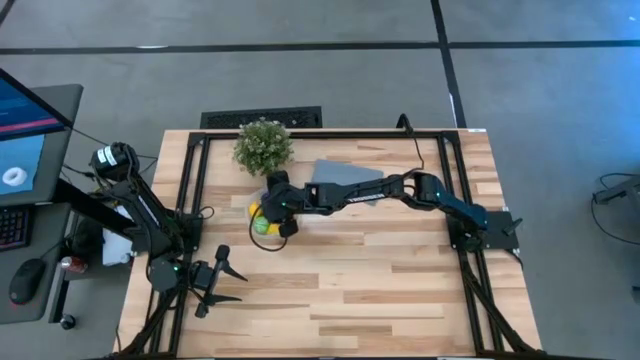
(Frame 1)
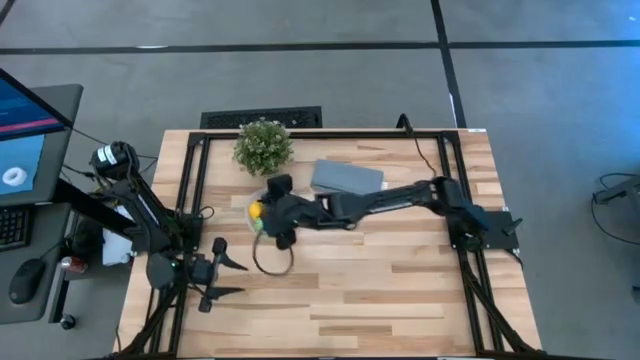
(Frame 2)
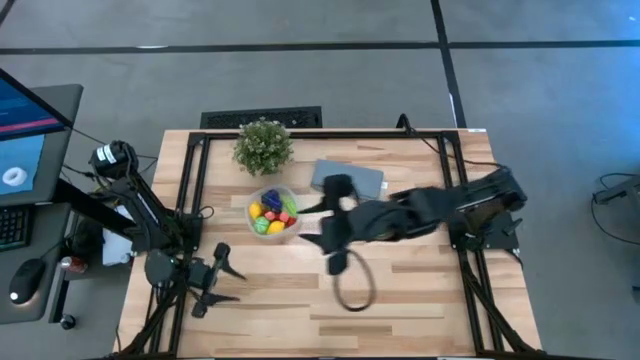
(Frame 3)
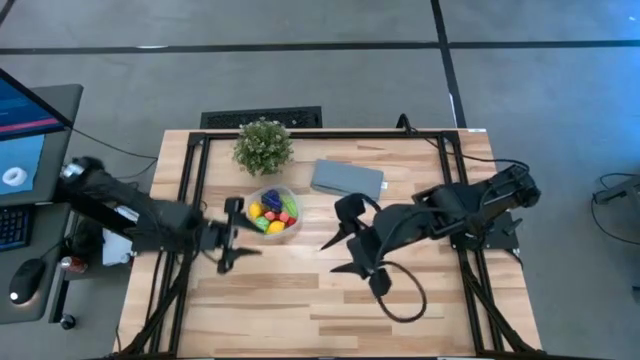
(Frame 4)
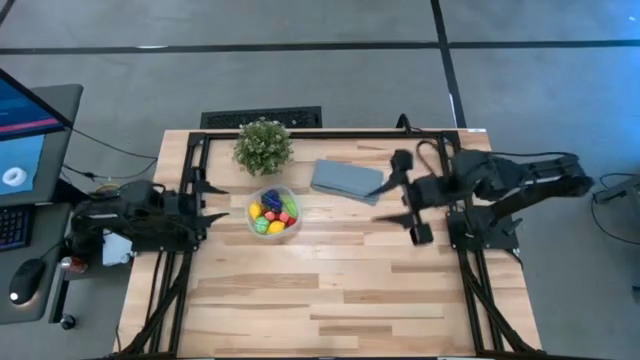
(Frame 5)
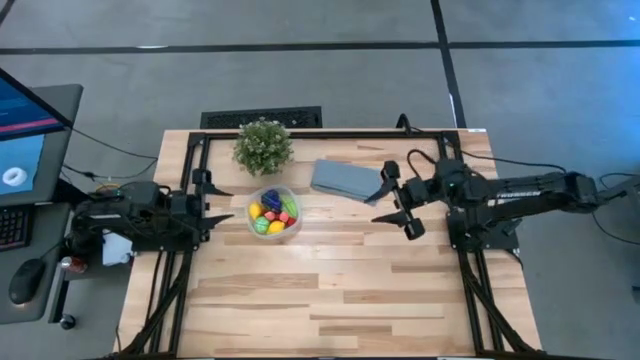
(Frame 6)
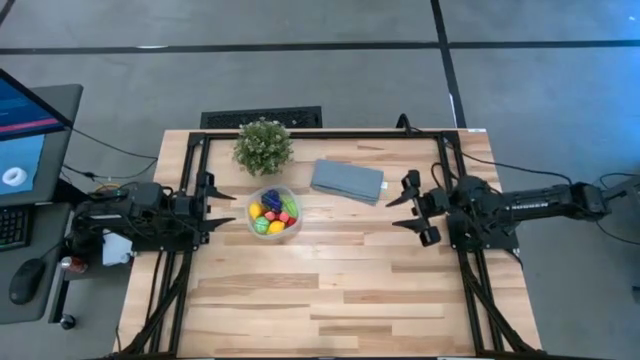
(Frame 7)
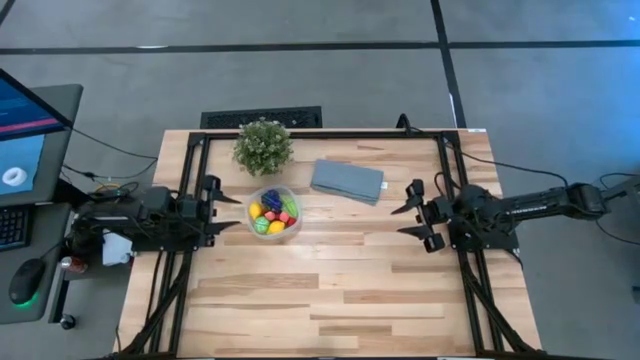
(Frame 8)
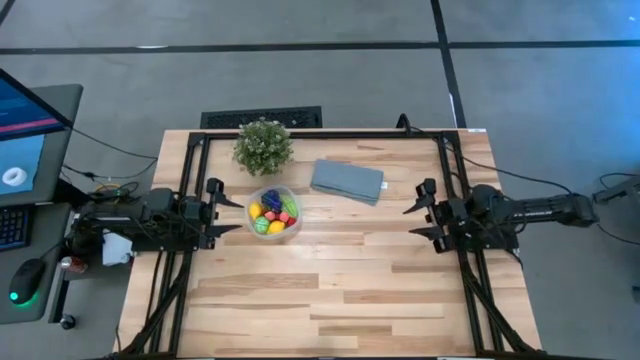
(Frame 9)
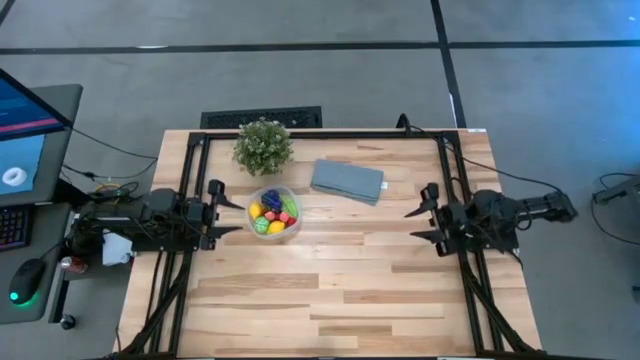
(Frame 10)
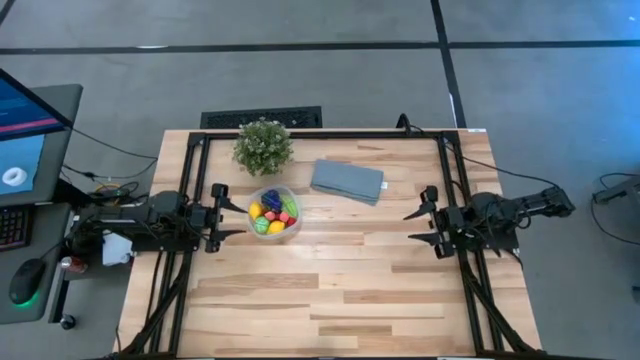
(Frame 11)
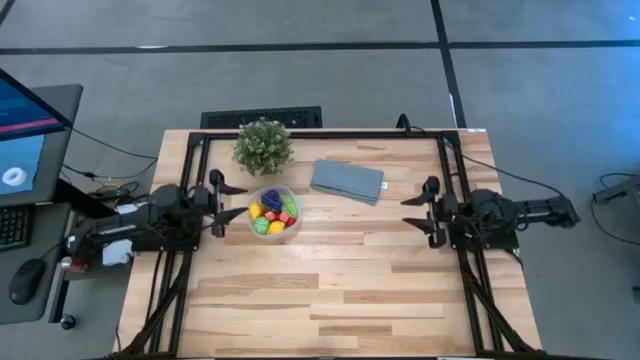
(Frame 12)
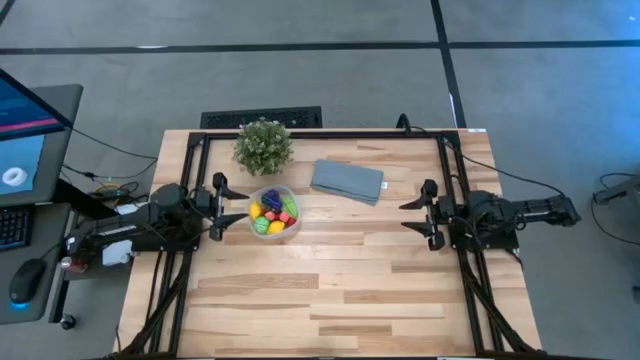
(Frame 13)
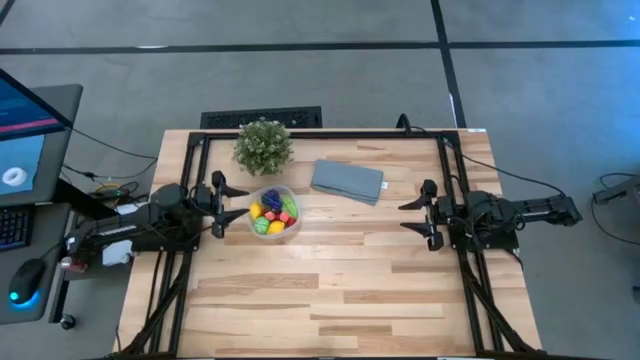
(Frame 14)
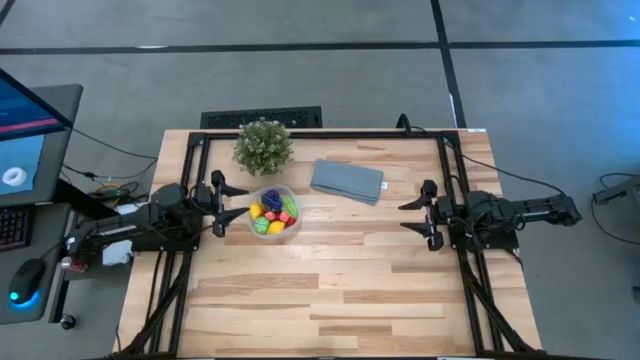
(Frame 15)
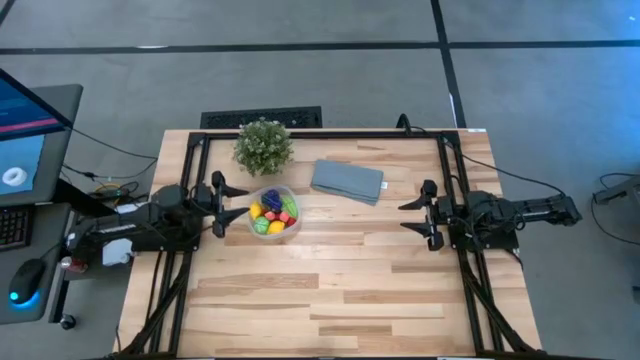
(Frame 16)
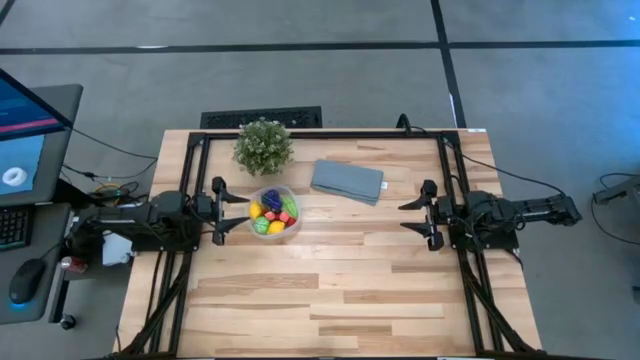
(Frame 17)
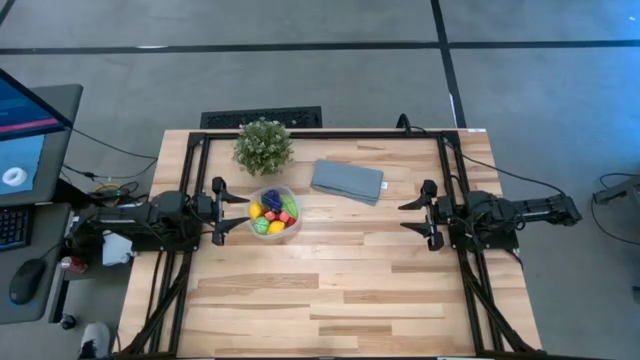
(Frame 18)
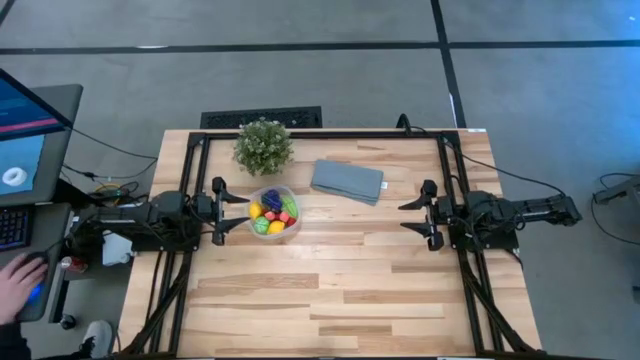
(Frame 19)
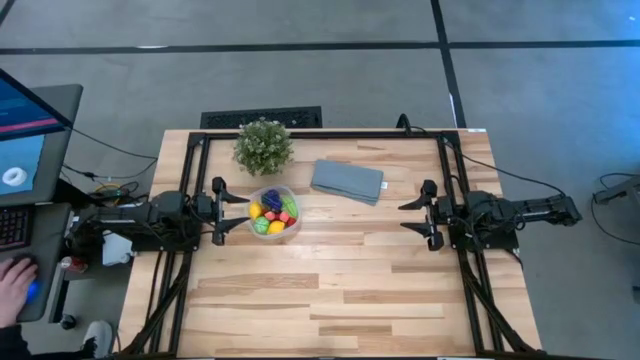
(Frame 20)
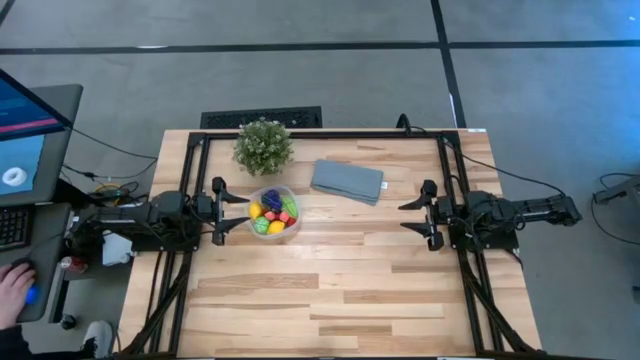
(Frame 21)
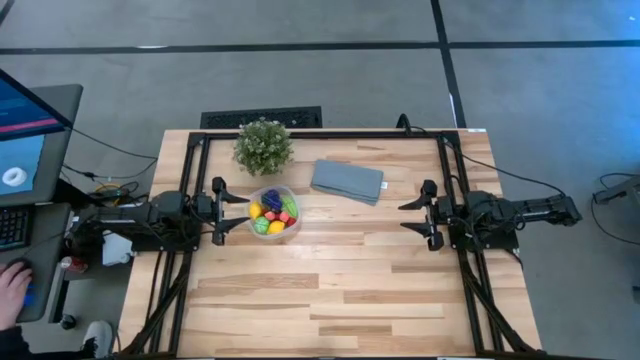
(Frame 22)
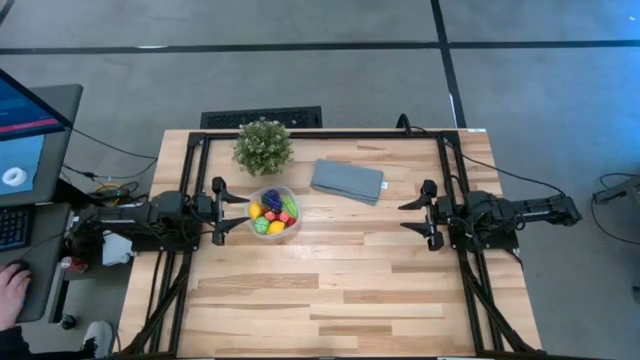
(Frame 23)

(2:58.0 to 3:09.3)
Task: Pick and placing Produce into tupperware
Return to Home Position

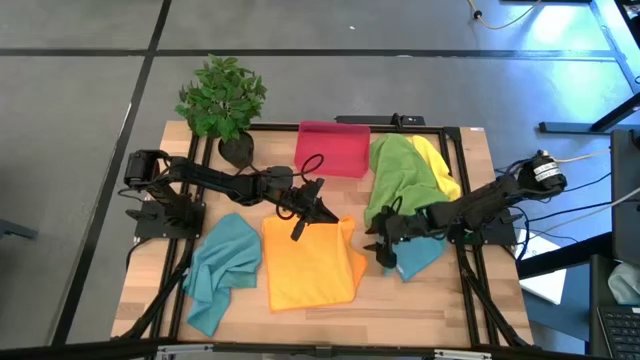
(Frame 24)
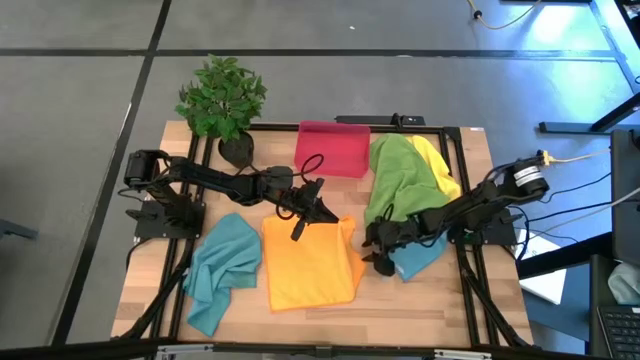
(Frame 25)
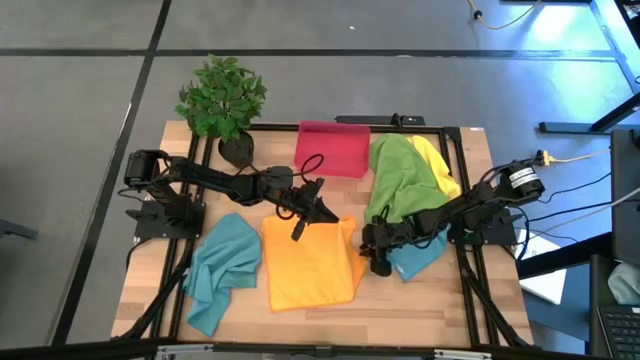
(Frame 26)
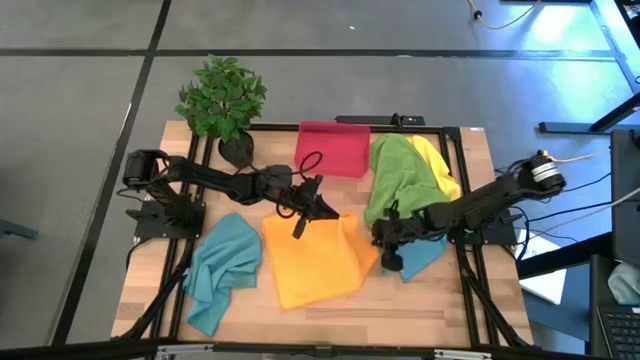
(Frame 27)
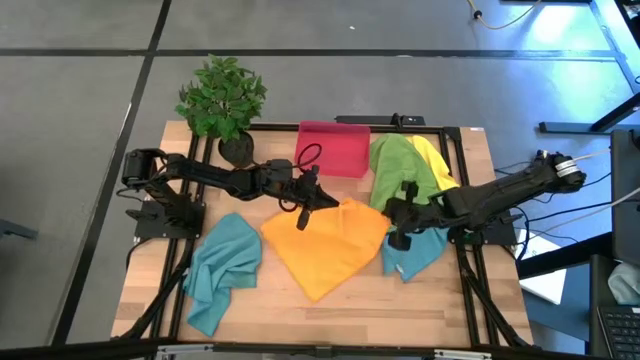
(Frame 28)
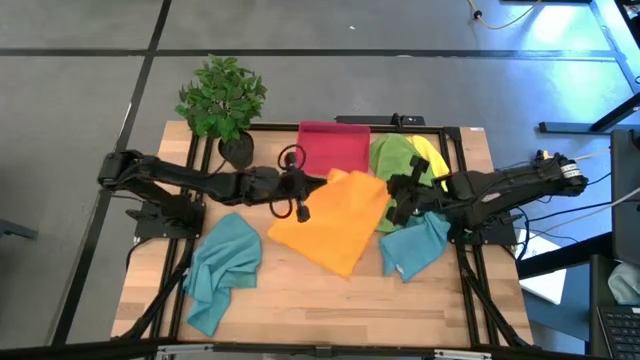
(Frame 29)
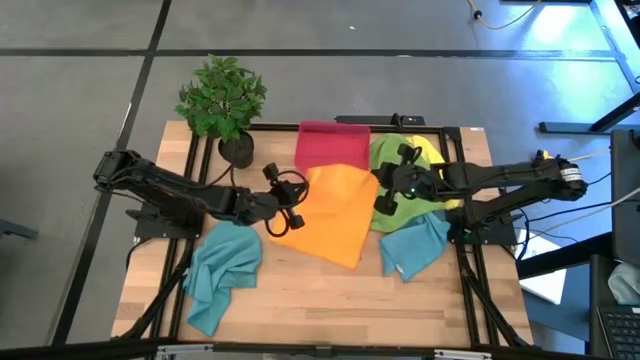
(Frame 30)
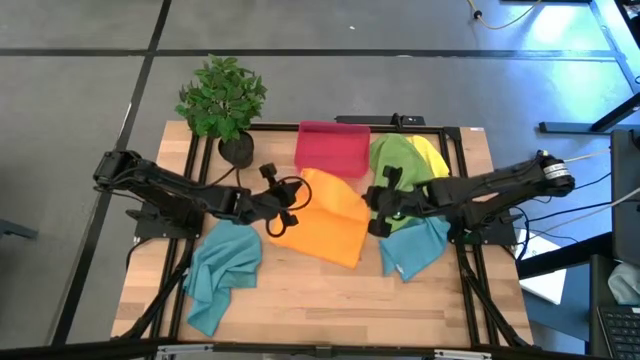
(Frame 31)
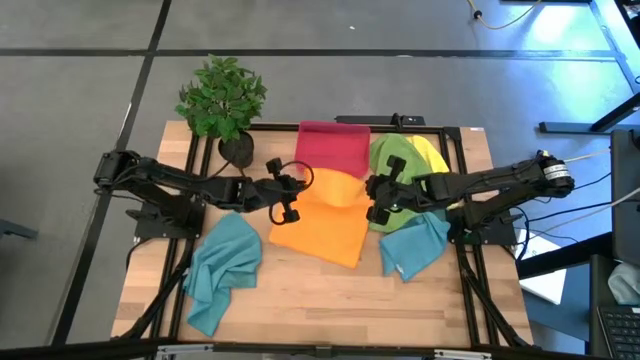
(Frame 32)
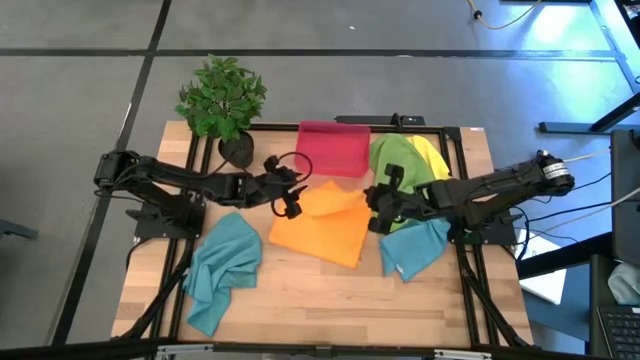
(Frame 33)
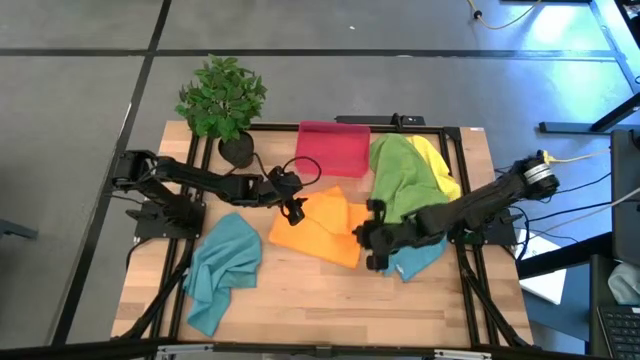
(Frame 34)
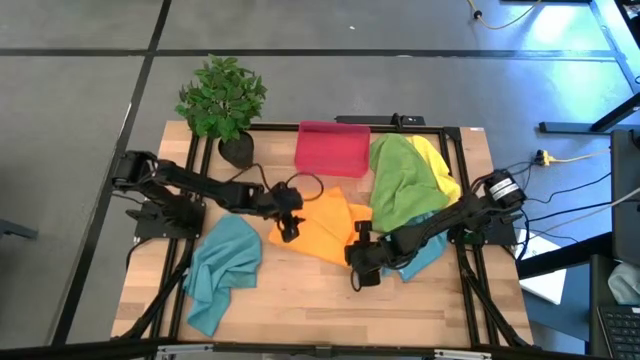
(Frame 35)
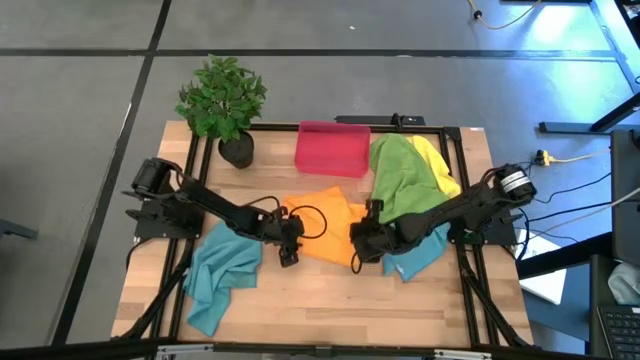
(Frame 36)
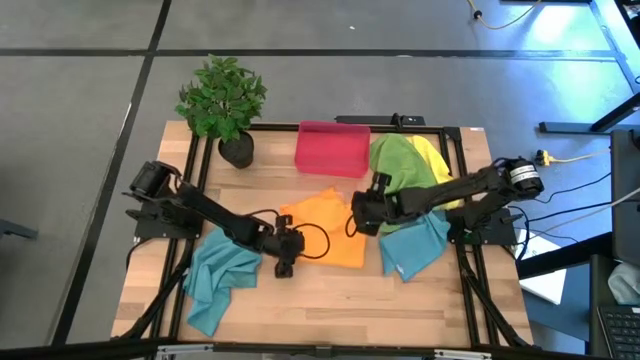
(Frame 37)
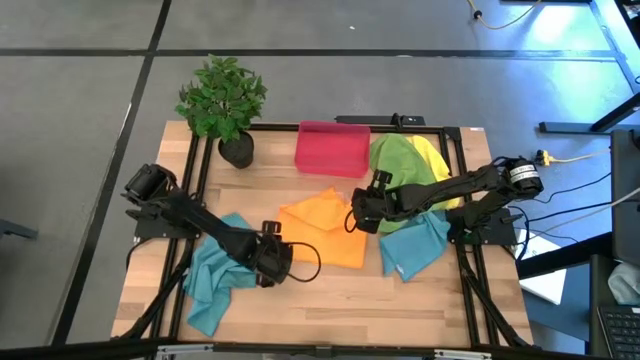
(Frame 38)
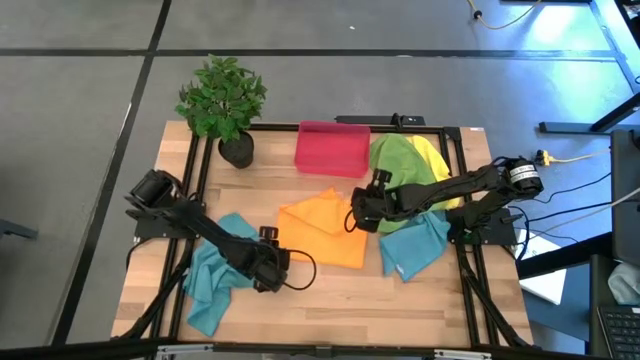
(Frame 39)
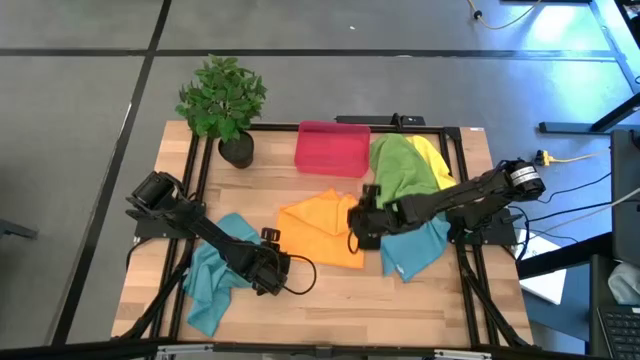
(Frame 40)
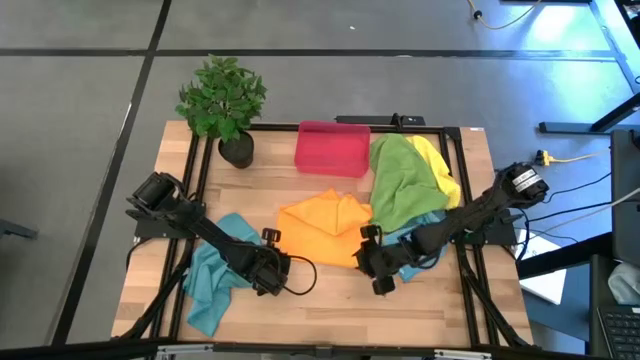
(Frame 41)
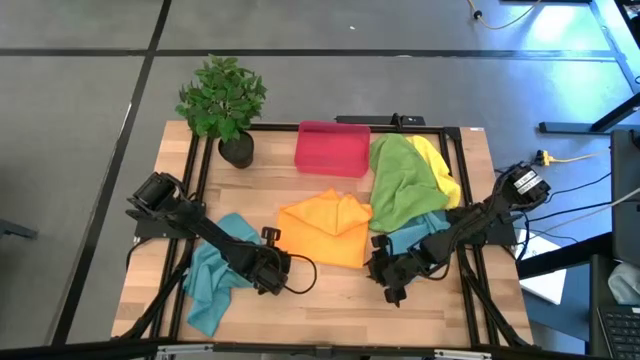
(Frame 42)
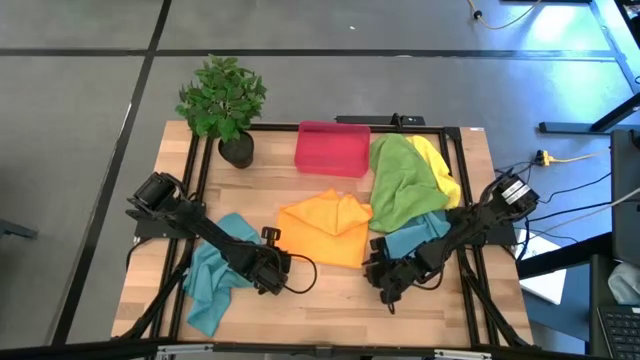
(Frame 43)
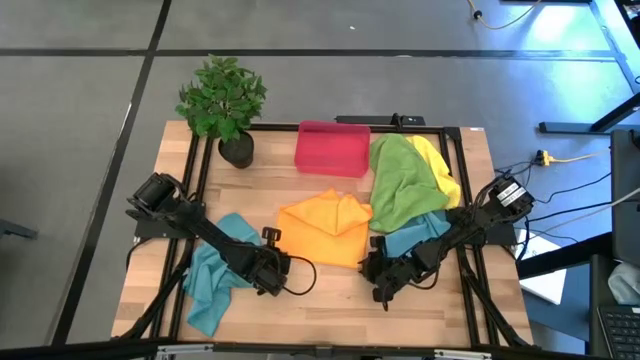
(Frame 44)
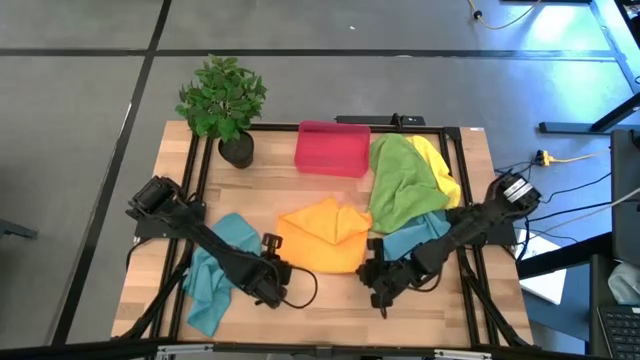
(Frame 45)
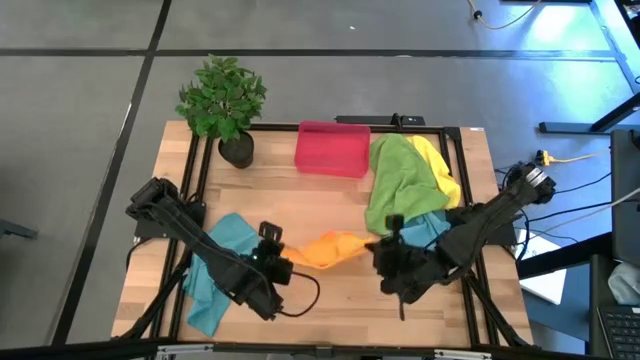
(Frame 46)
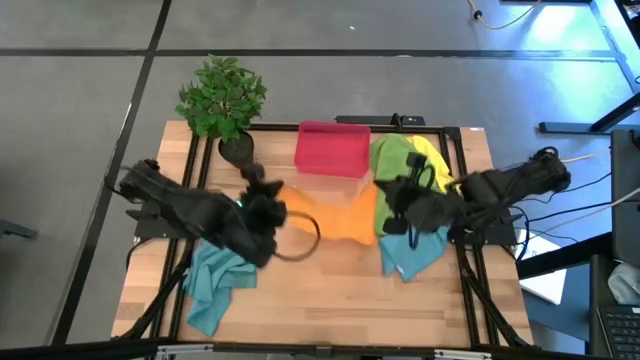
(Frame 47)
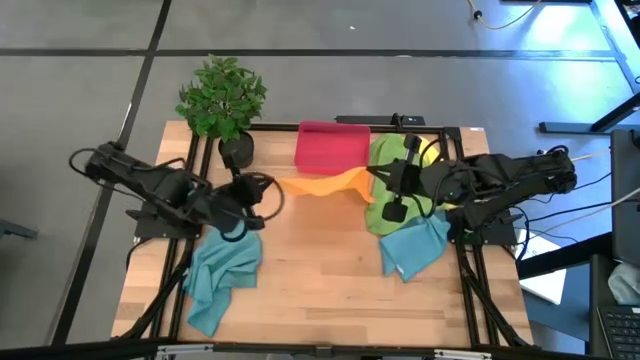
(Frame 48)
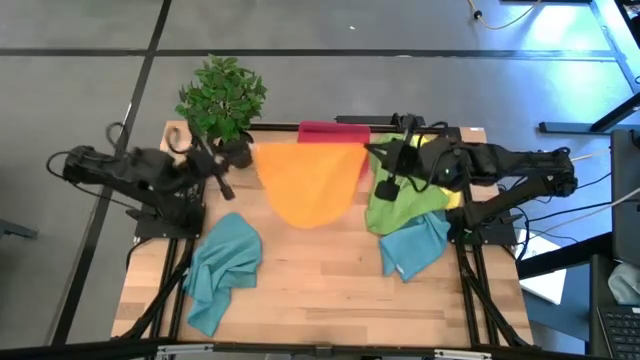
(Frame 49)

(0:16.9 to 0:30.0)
Task: Roll microfiber towels into tight, uniform cylinder then place into a basket
Fold the orange towel
